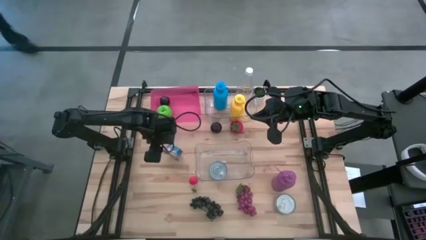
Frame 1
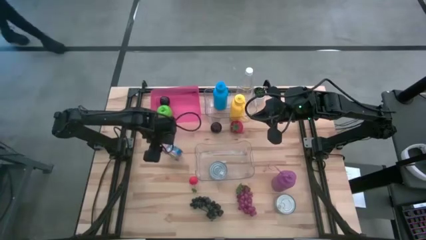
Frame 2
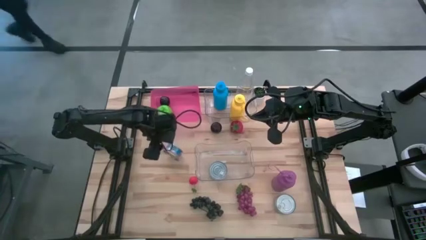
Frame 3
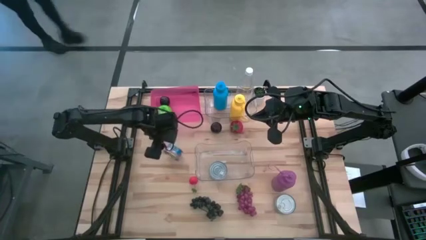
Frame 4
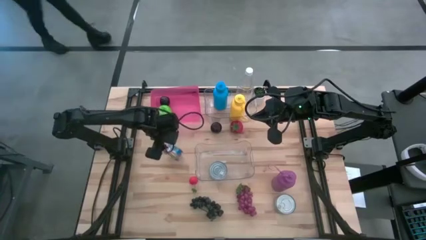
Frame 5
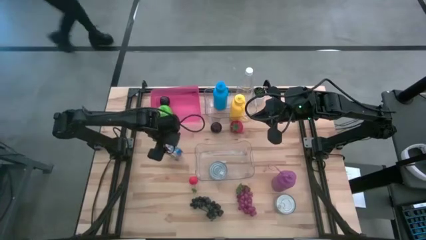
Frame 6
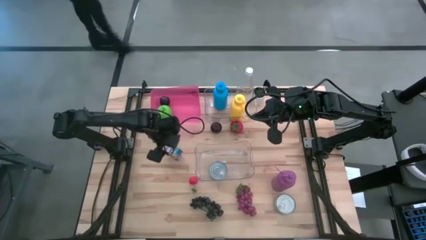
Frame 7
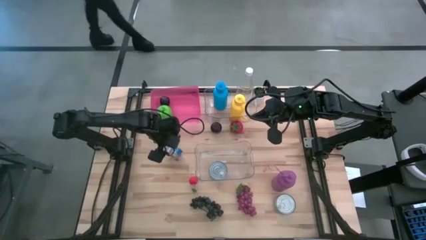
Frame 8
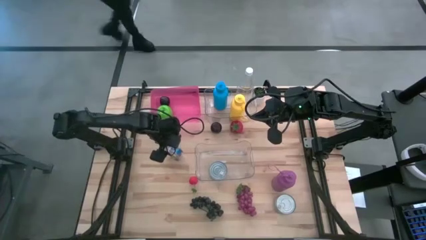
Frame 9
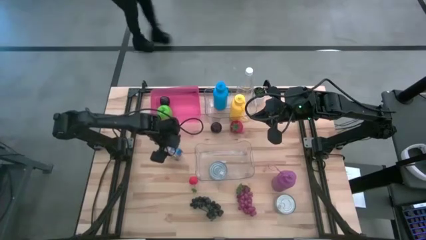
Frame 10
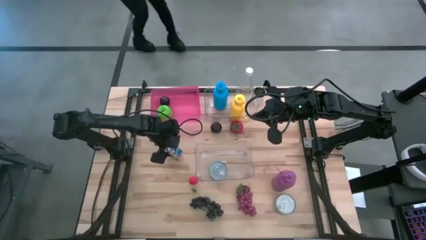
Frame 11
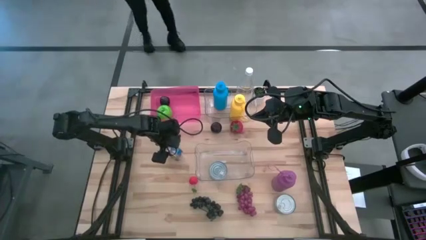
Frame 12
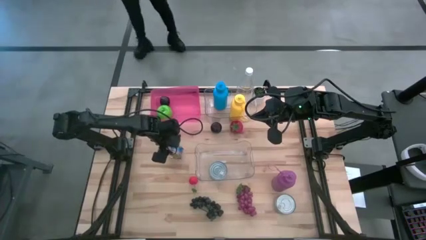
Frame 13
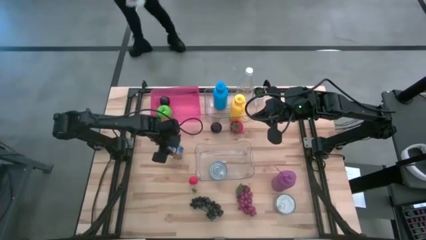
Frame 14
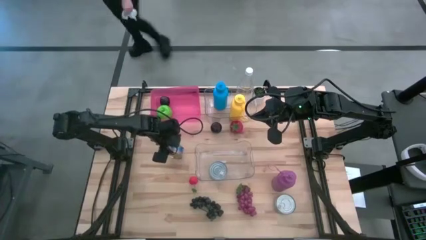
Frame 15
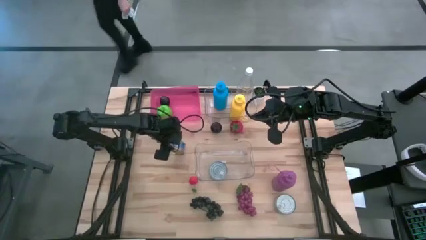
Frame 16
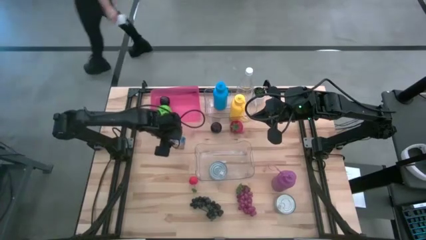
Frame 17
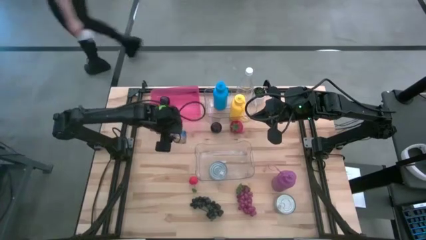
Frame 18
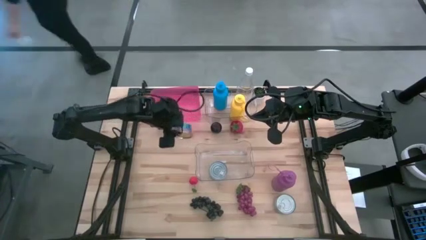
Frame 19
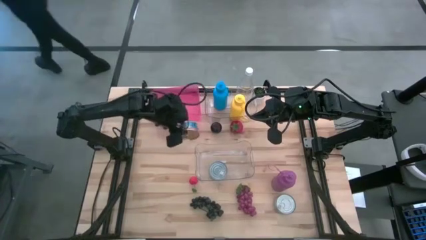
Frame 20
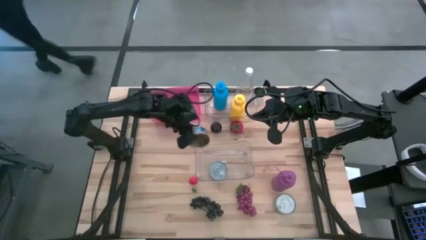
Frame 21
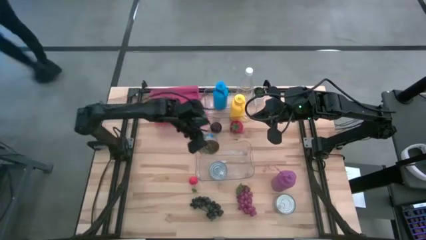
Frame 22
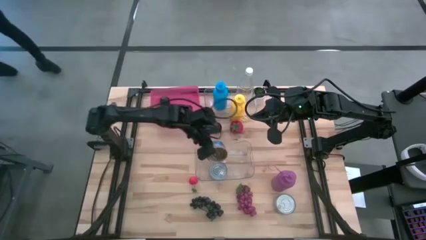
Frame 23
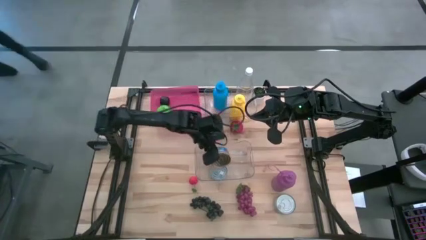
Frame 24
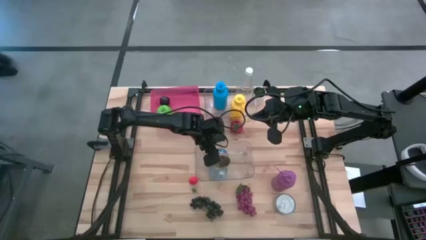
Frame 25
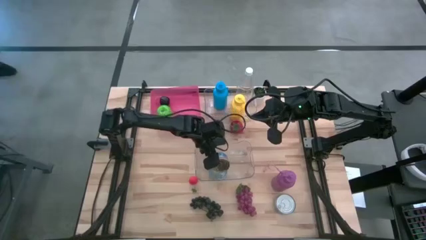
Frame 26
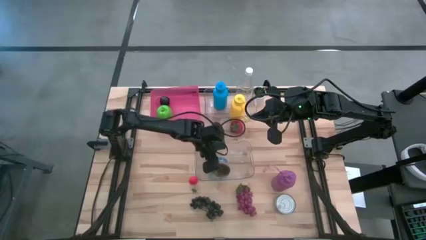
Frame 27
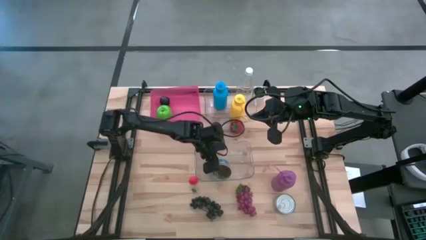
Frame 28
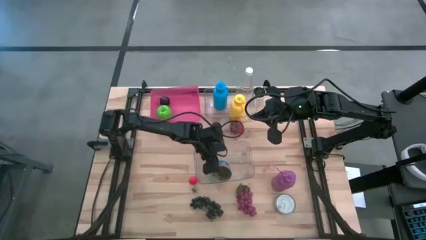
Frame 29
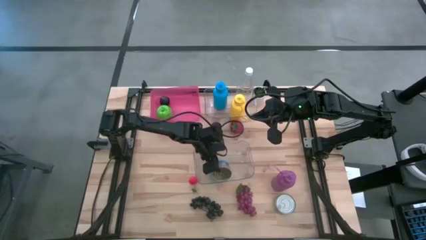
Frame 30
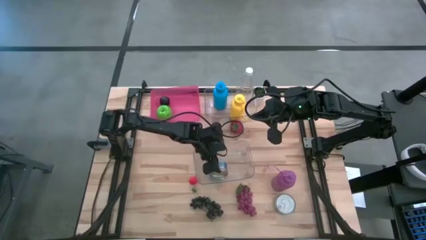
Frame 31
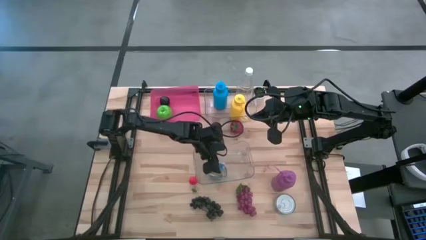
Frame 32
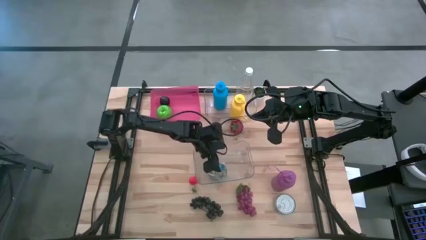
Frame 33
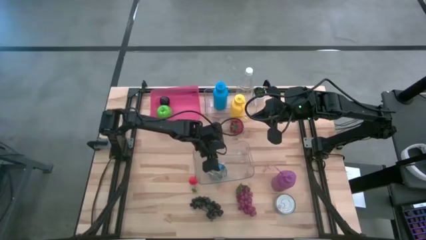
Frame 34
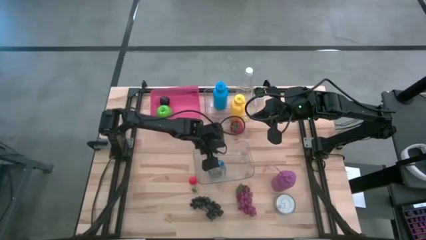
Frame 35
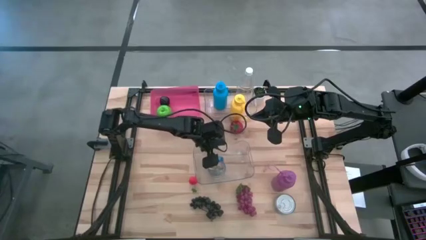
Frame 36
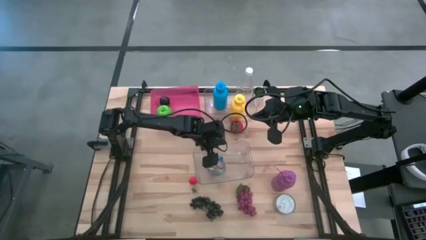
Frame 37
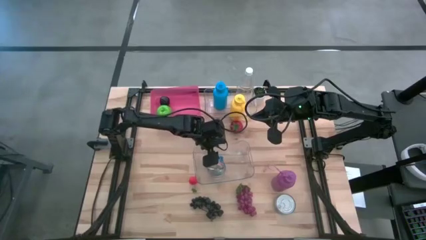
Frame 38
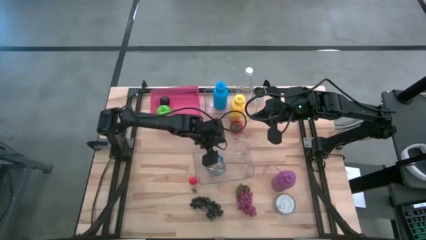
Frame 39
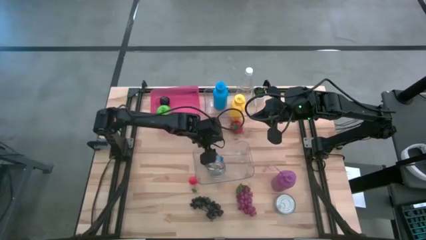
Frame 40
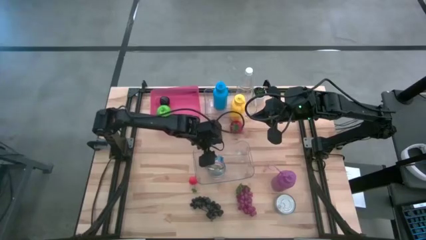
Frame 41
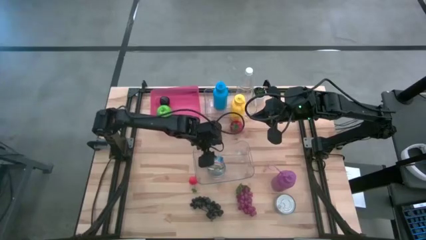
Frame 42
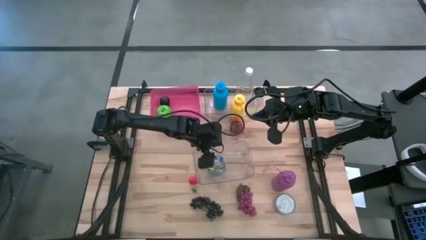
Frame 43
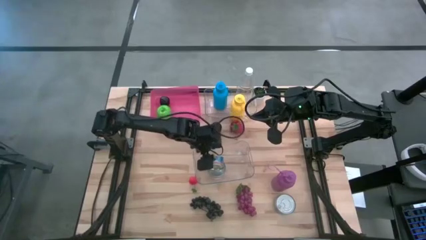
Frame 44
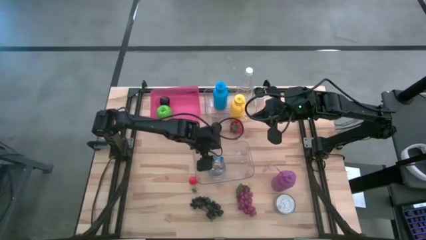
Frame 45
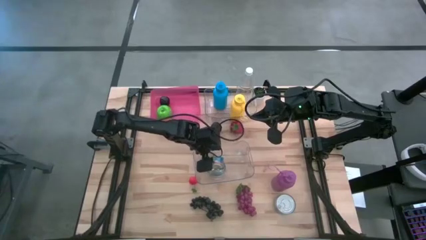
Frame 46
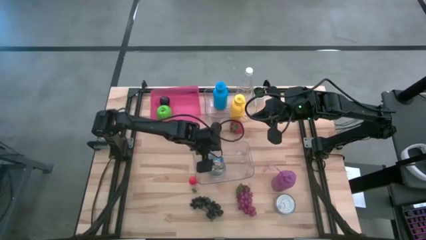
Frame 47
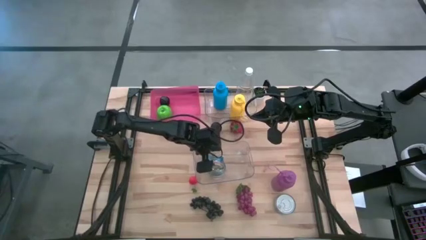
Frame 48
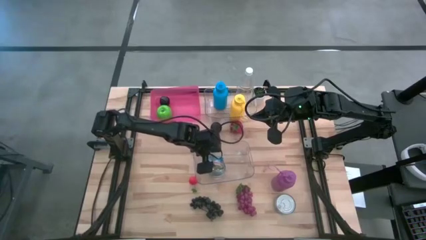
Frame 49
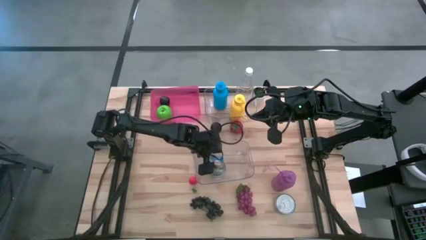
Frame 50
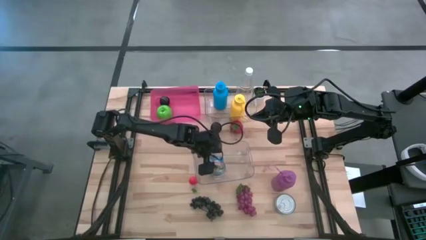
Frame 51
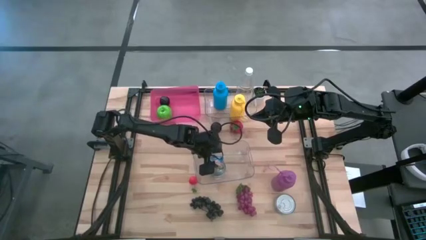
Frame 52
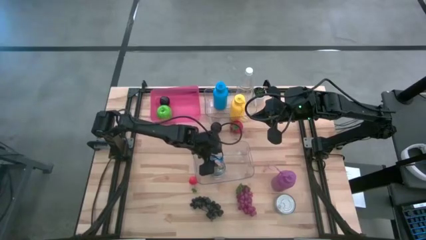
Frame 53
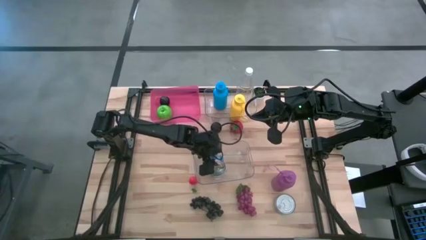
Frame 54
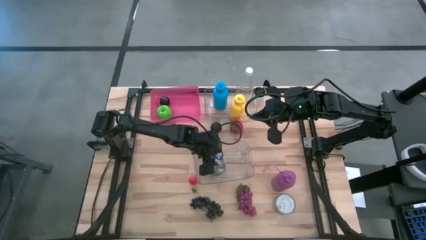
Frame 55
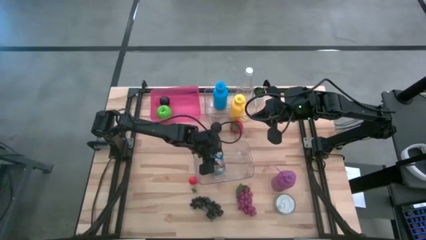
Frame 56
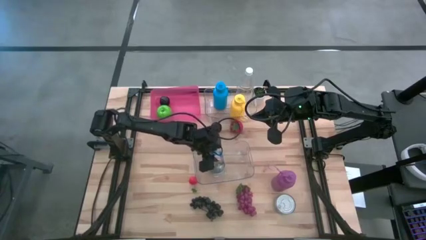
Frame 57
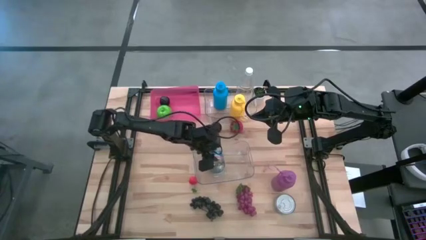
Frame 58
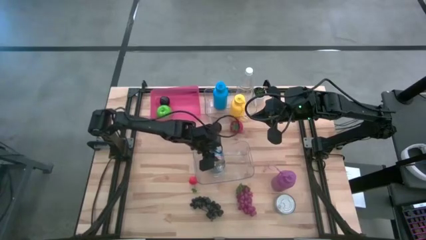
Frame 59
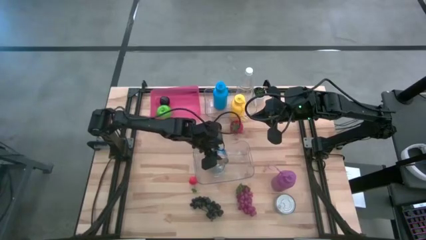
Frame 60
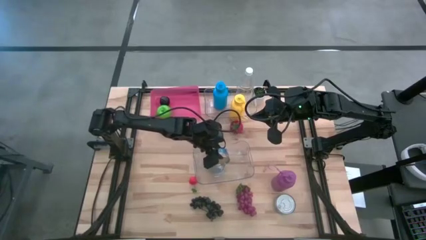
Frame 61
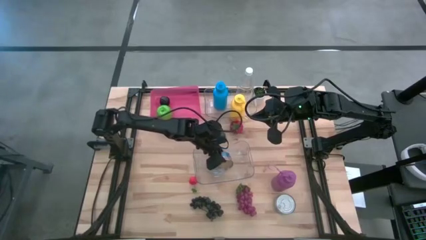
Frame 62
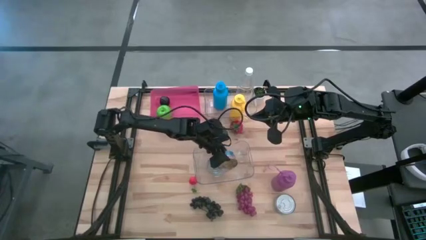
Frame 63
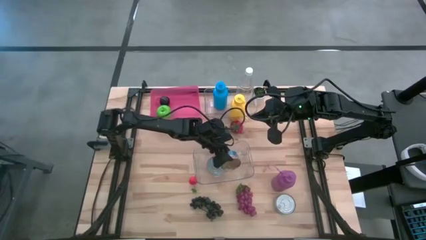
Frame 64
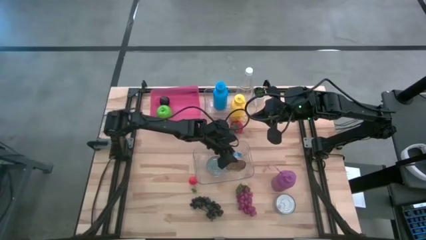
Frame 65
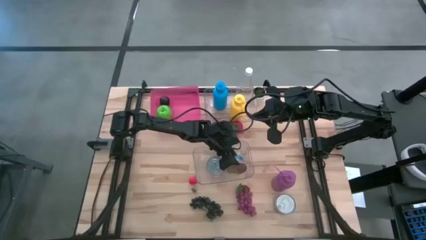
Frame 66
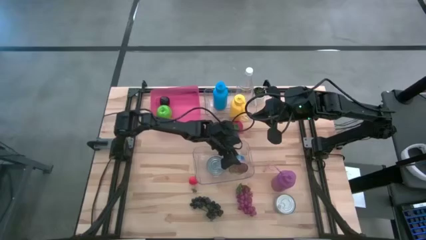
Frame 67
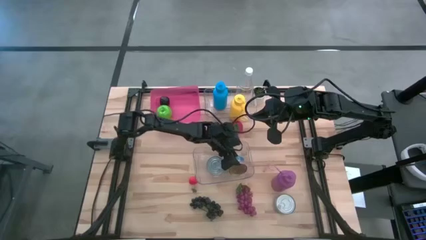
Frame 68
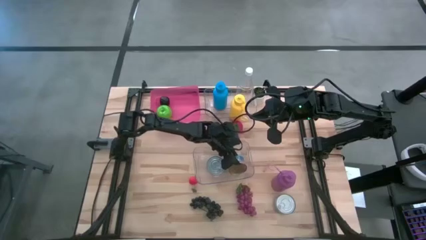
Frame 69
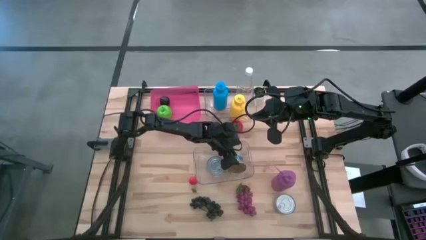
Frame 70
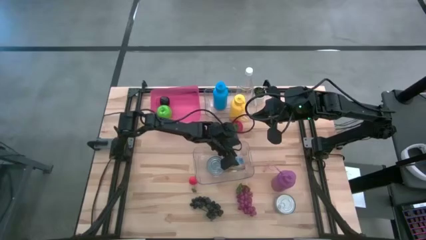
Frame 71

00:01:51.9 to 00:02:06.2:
Task: Pick & Place Food Item
Put the blue pink tuna can into the bottom transparent bin
